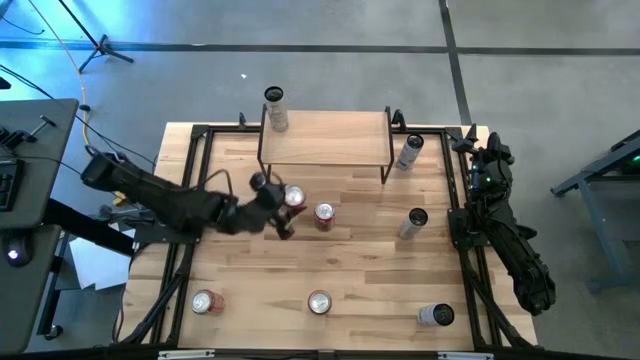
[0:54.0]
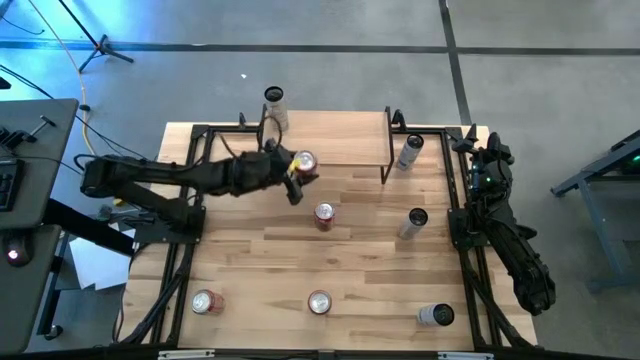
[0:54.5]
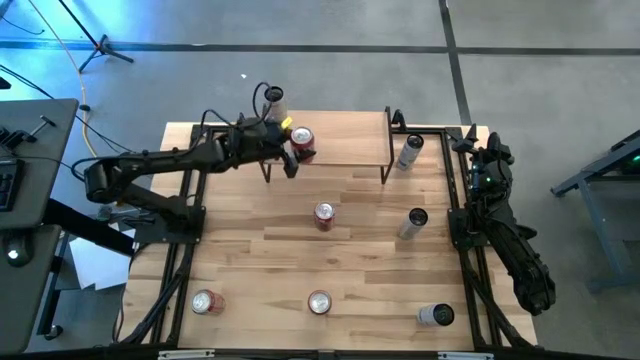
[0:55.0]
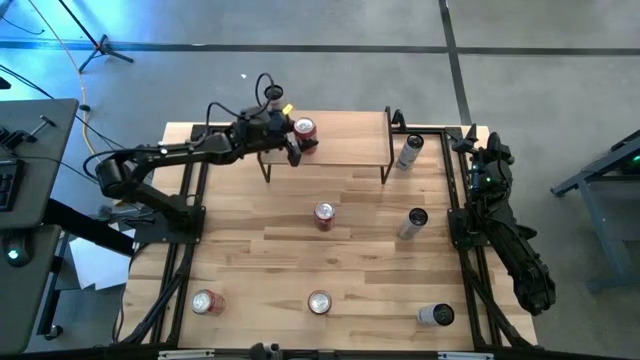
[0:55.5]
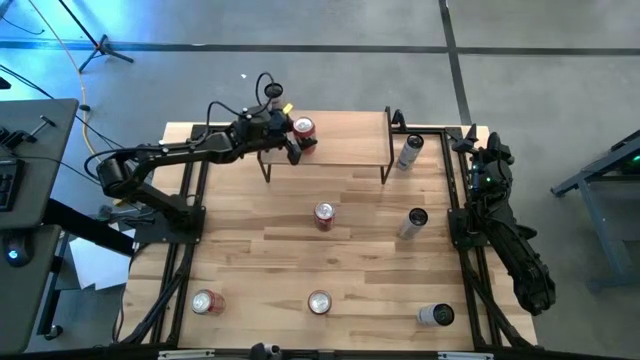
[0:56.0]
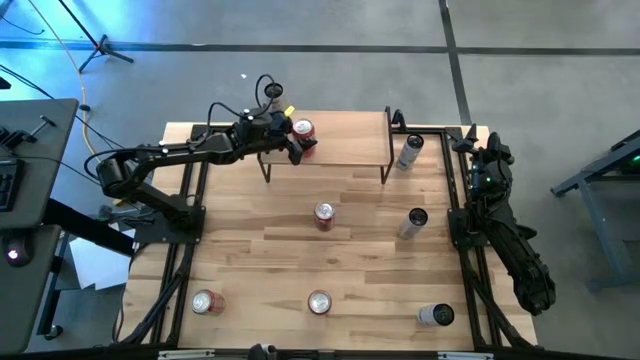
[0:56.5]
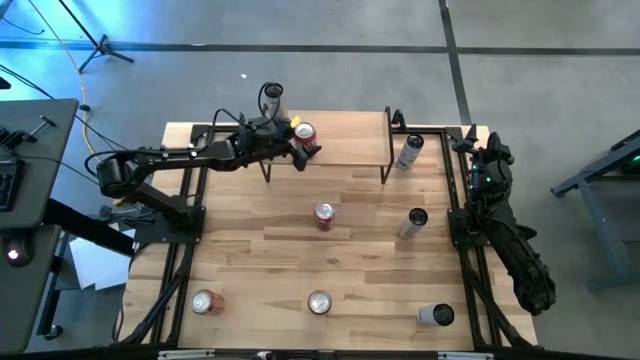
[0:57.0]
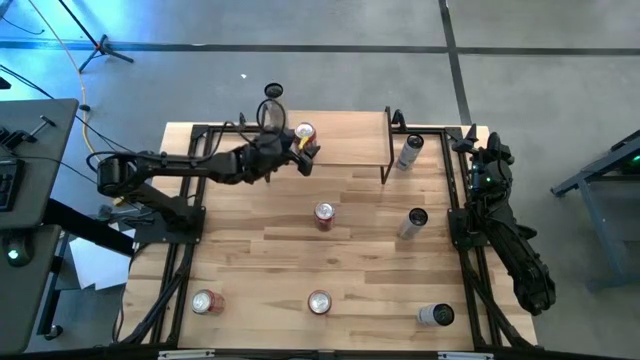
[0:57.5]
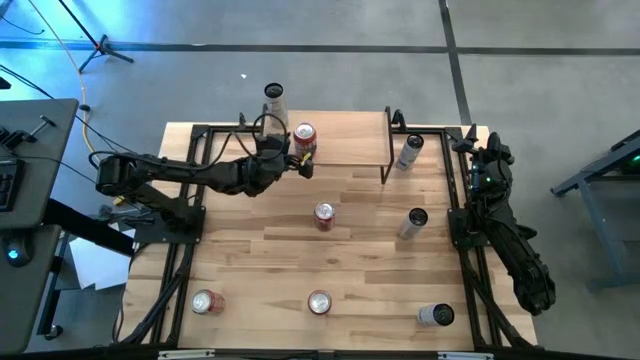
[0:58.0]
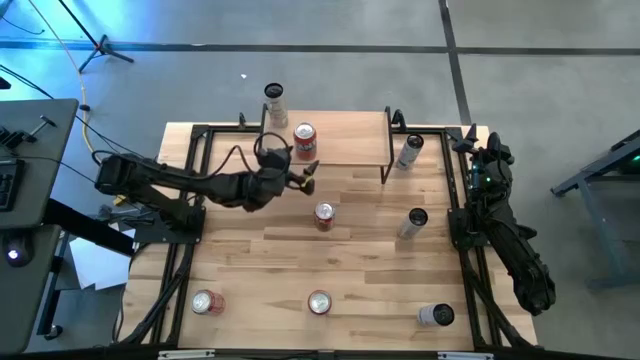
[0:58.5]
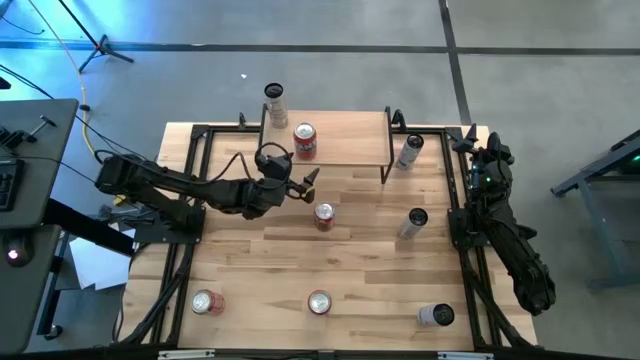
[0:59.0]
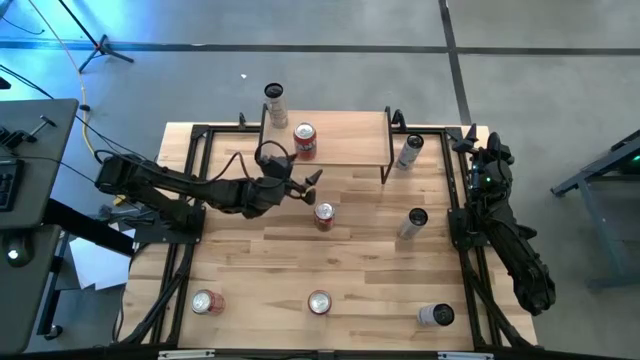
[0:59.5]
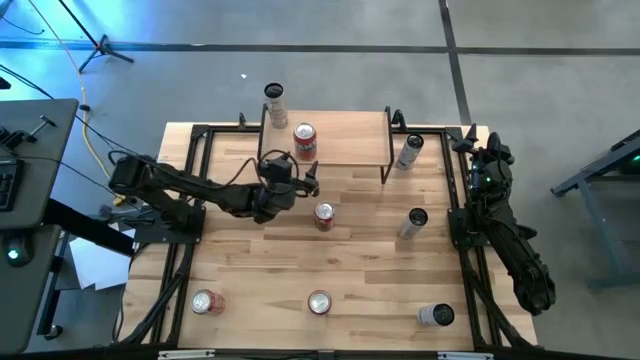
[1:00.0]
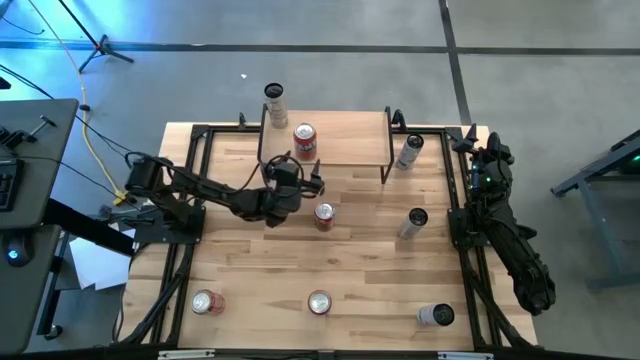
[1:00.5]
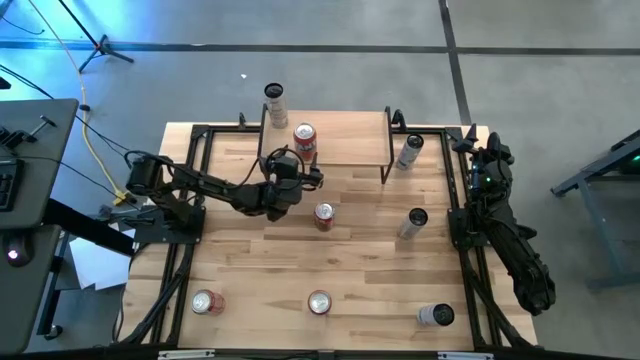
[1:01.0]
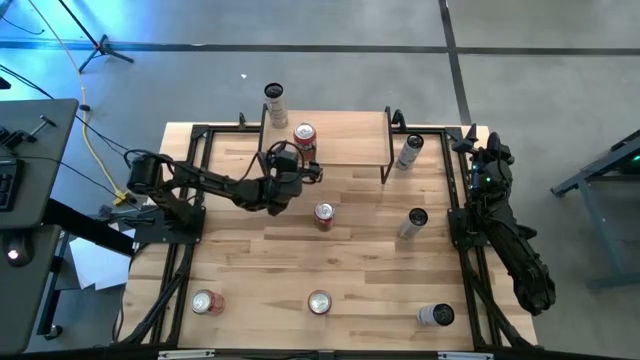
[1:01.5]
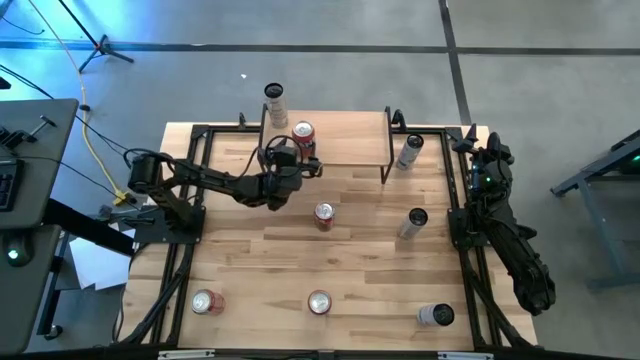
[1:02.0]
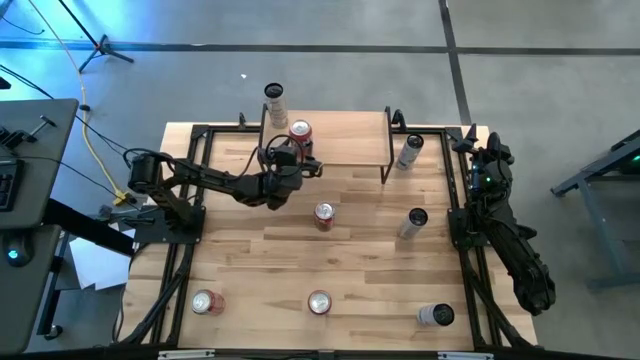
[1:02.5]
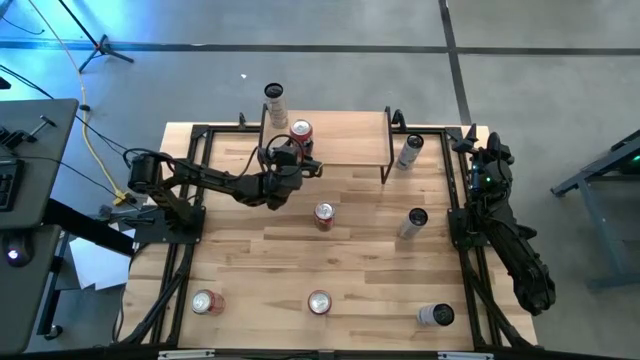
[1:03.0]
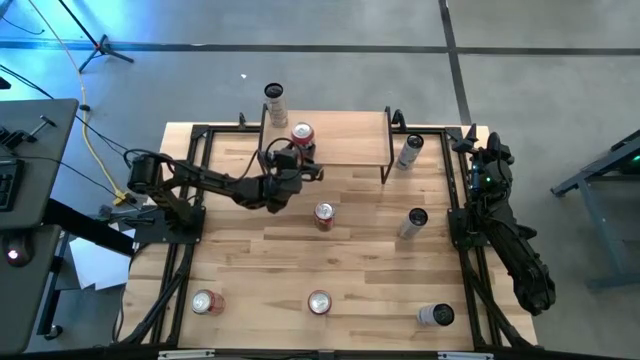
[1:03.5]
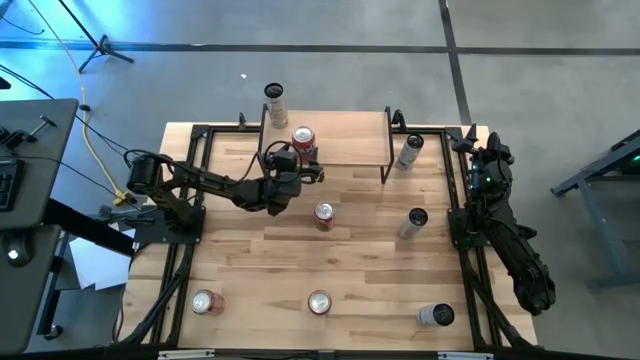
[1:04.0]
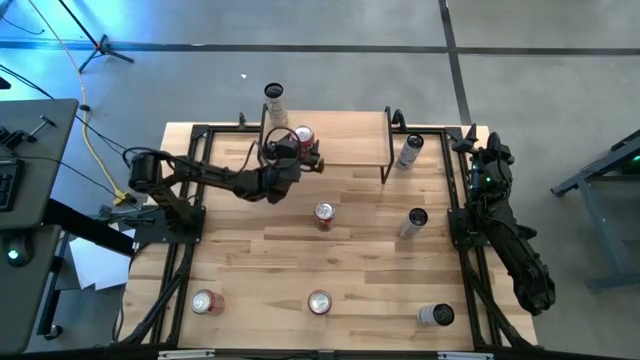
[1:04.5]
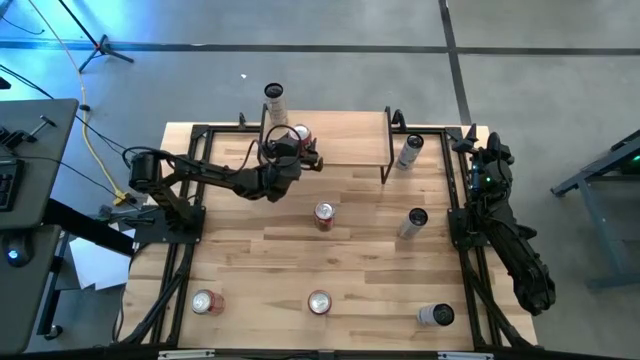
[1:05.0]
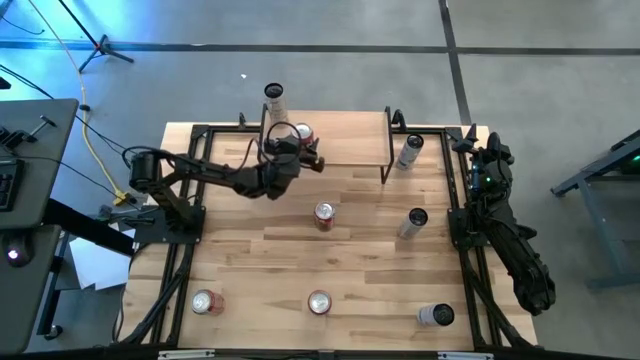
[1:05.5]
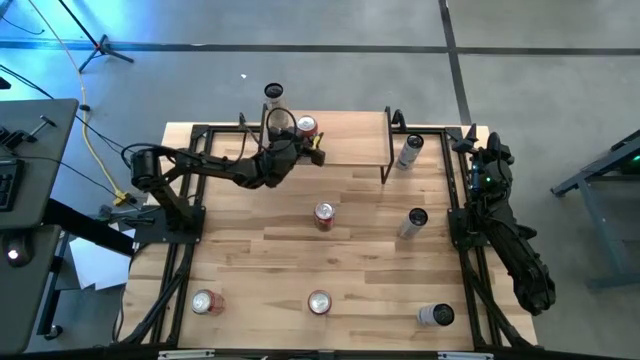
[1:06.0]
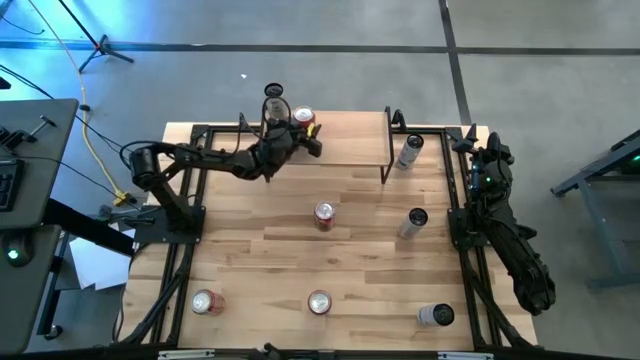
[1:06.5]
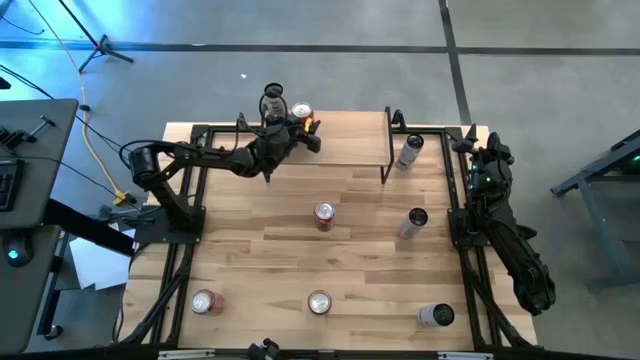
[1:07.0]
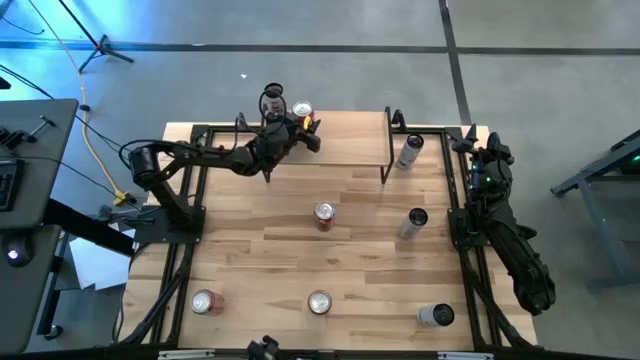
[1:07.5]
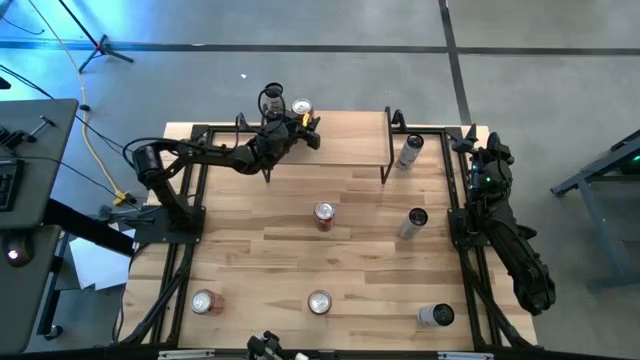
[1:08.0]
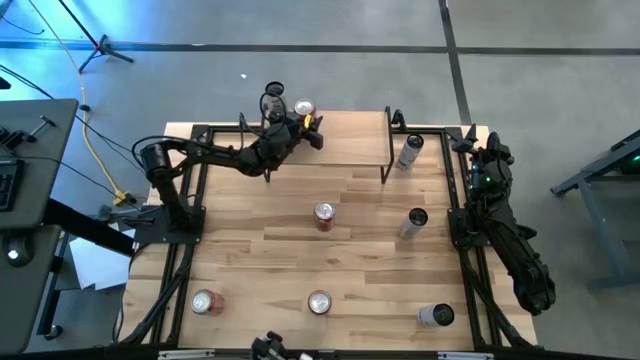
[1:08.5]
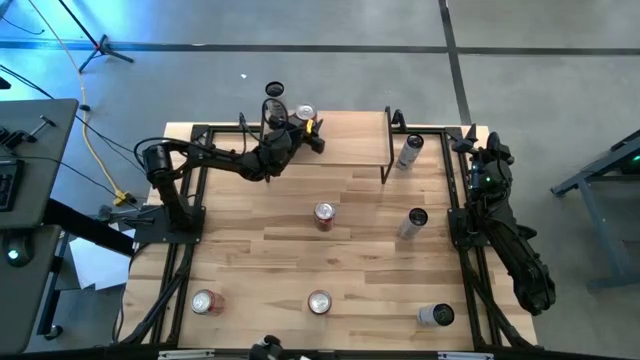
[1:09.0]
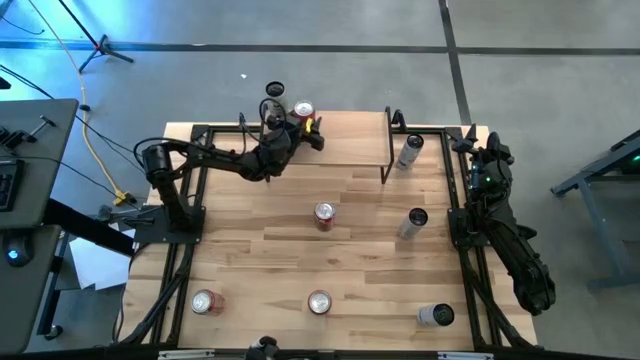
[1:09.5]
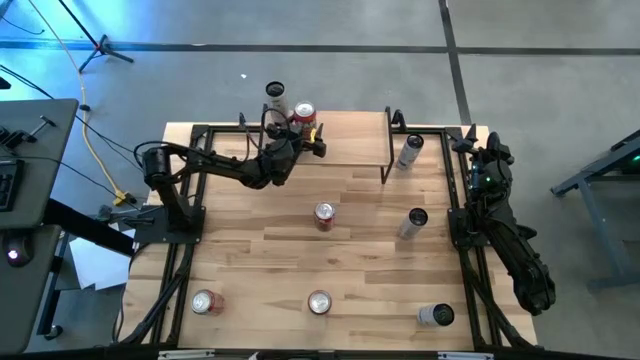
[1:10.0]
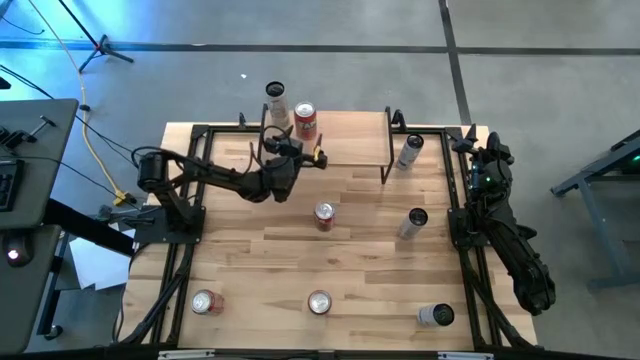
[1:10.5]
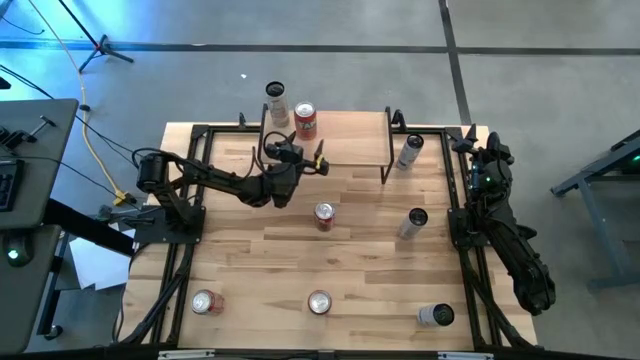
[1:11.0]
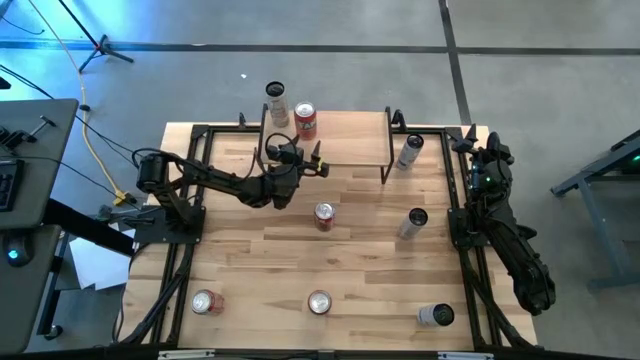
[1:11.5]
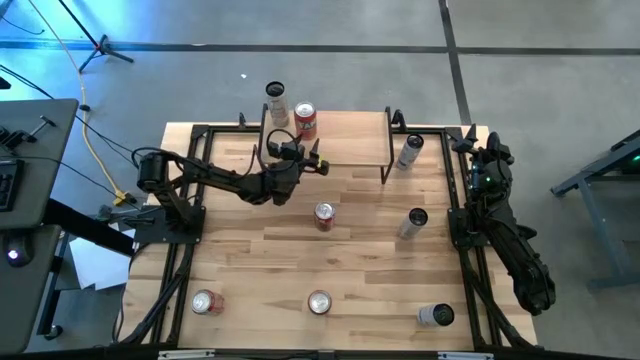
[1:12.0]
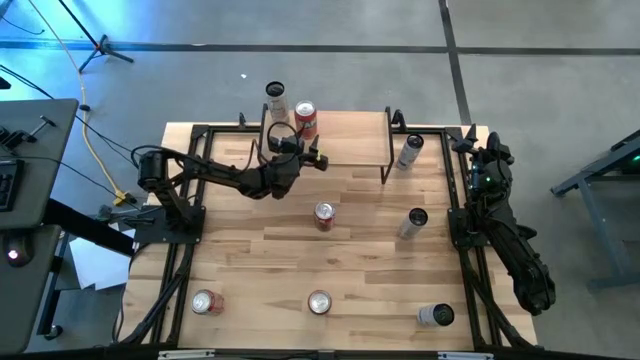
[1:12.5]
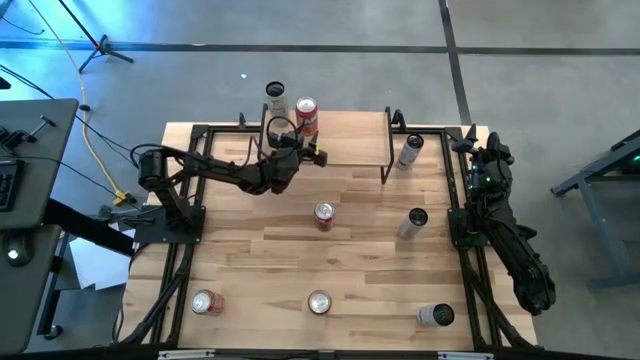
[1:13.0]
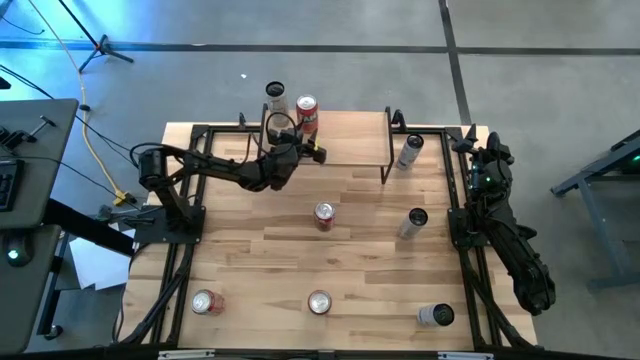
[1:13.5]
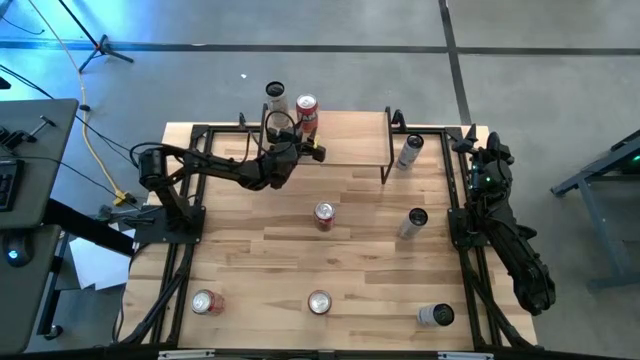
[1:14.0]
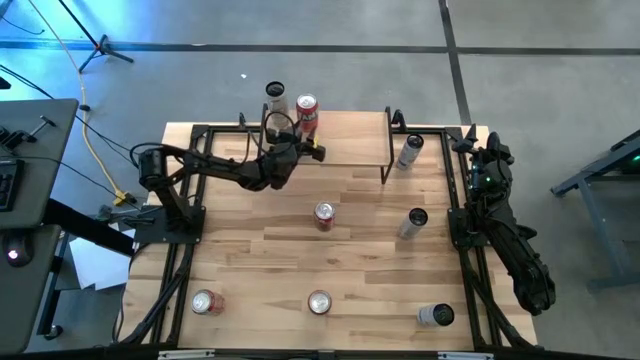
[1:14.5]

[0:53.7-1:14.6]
Task: Place canned beverage on shelf
Put the red soda can on the shelf
